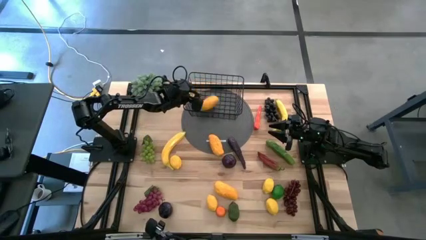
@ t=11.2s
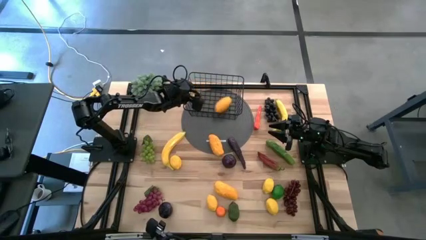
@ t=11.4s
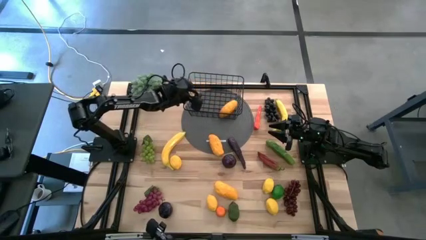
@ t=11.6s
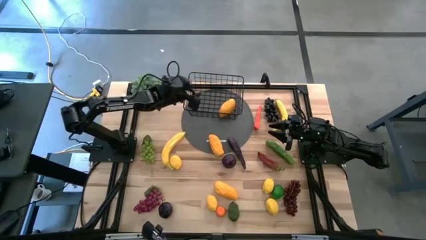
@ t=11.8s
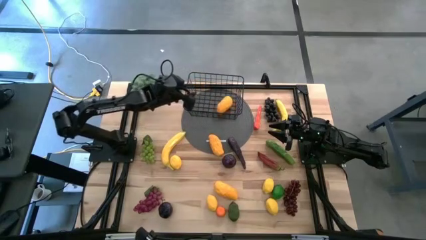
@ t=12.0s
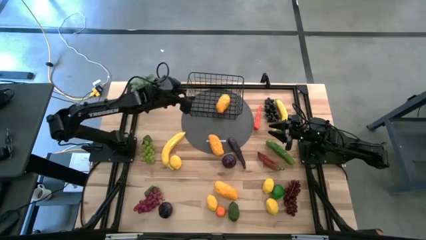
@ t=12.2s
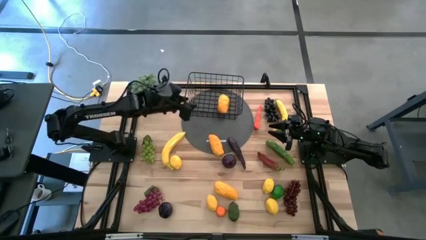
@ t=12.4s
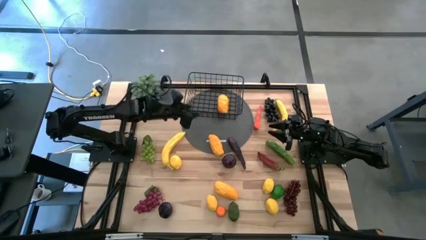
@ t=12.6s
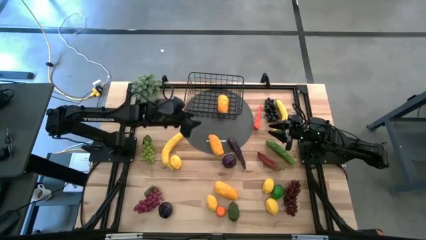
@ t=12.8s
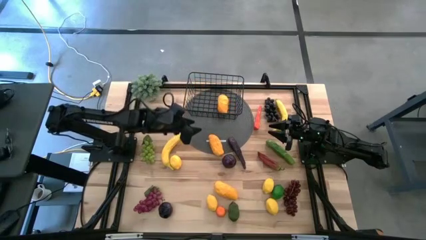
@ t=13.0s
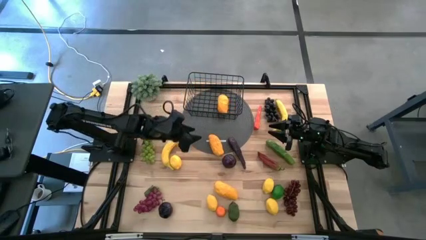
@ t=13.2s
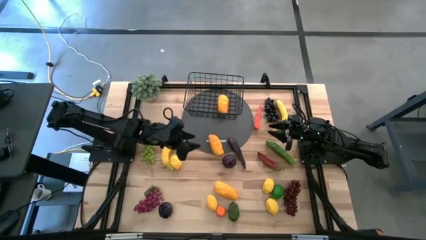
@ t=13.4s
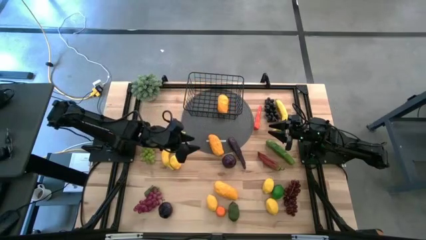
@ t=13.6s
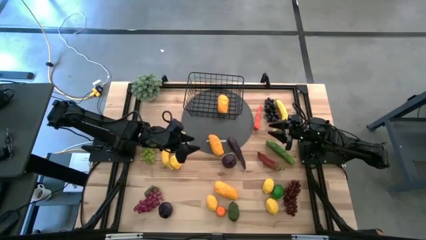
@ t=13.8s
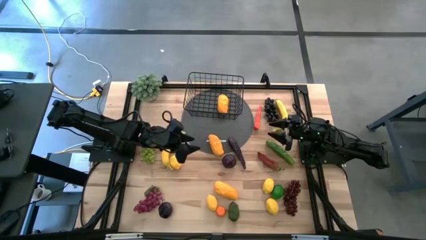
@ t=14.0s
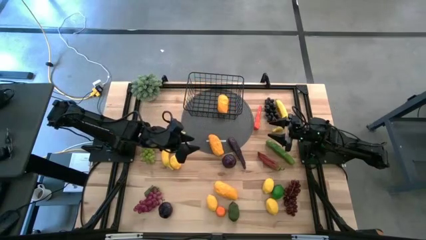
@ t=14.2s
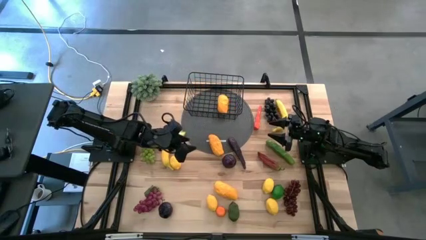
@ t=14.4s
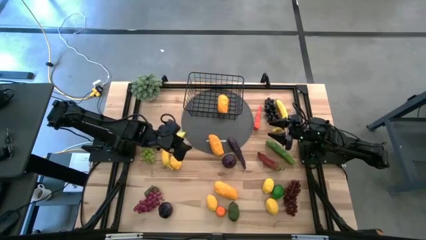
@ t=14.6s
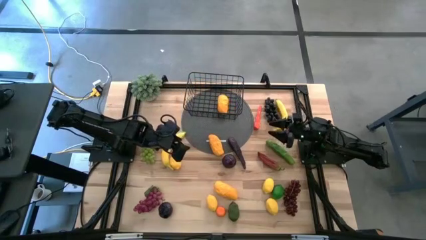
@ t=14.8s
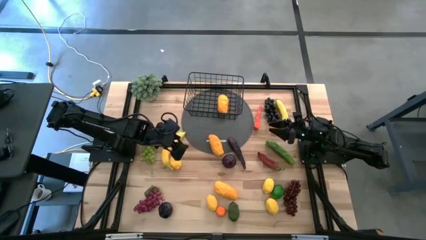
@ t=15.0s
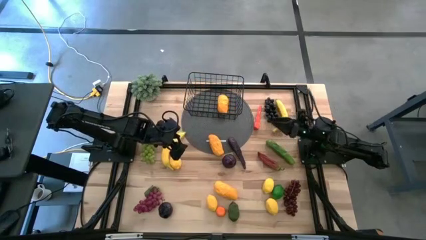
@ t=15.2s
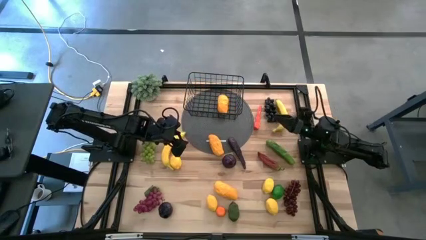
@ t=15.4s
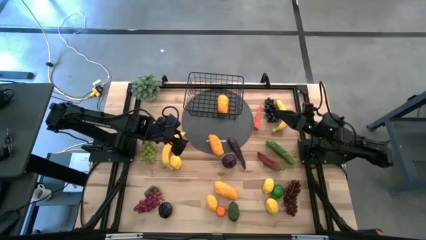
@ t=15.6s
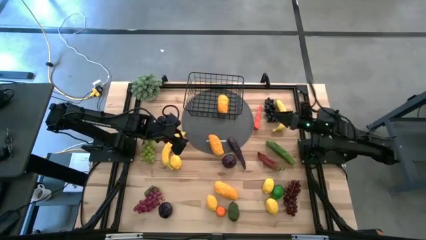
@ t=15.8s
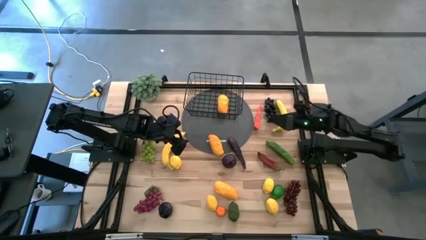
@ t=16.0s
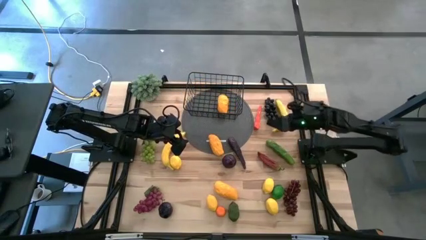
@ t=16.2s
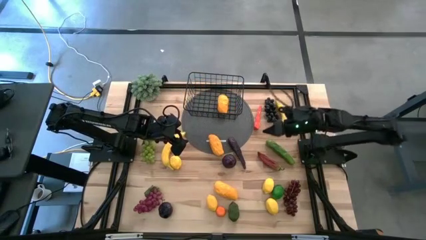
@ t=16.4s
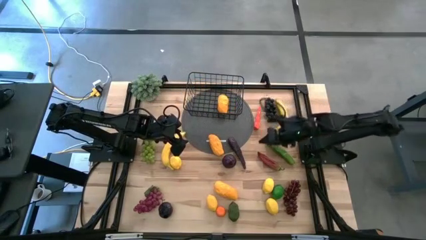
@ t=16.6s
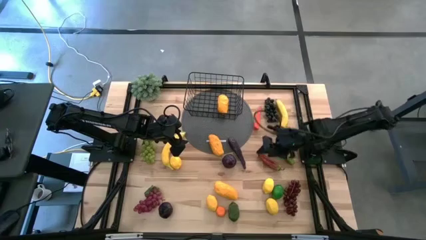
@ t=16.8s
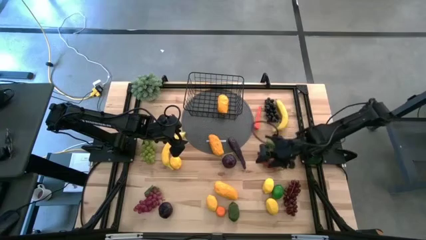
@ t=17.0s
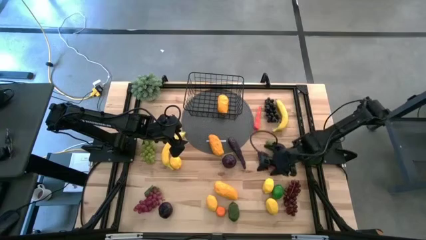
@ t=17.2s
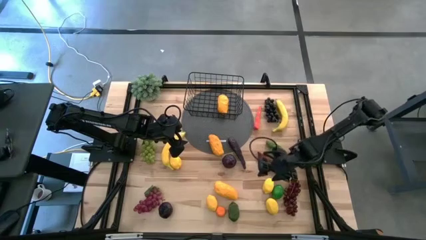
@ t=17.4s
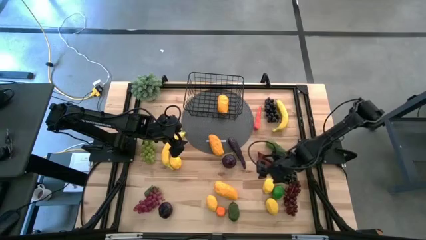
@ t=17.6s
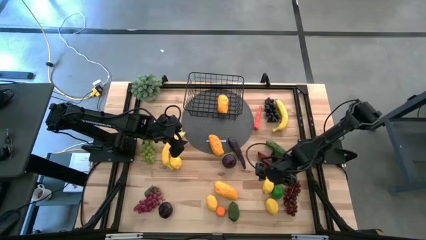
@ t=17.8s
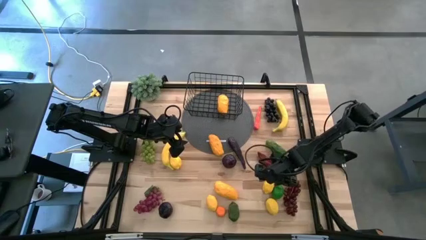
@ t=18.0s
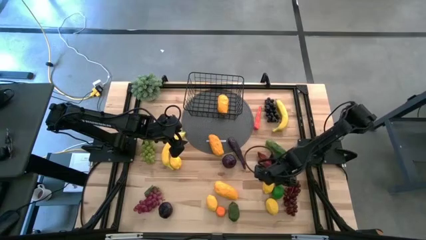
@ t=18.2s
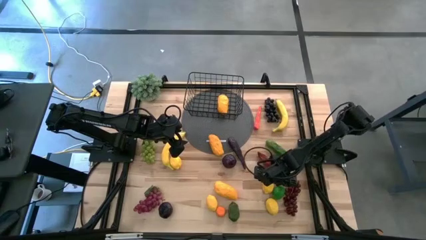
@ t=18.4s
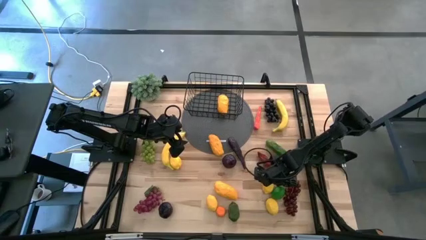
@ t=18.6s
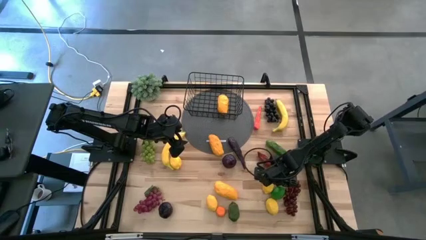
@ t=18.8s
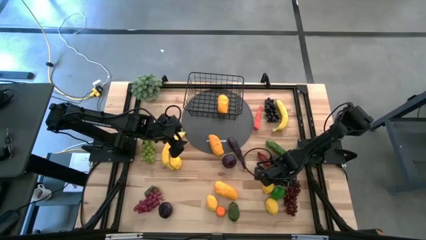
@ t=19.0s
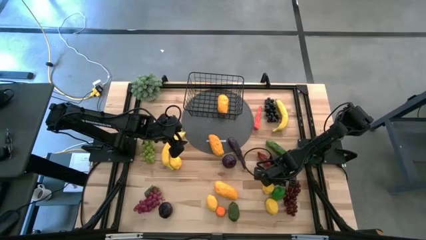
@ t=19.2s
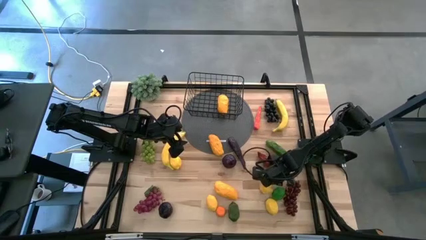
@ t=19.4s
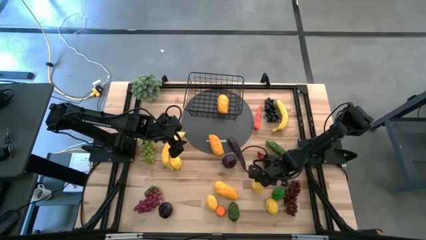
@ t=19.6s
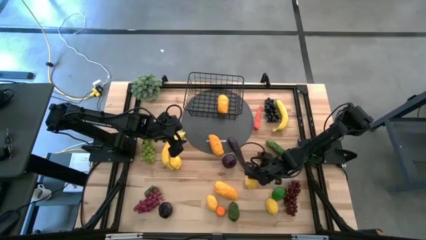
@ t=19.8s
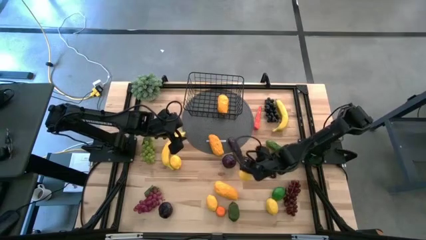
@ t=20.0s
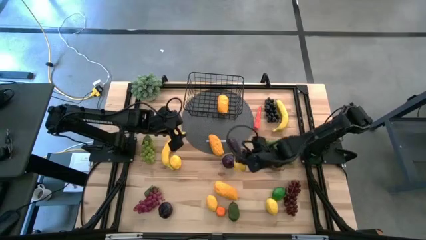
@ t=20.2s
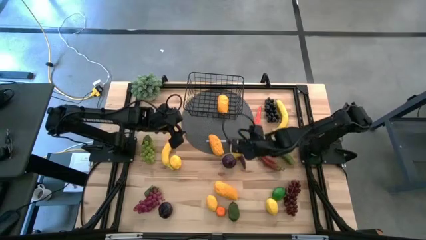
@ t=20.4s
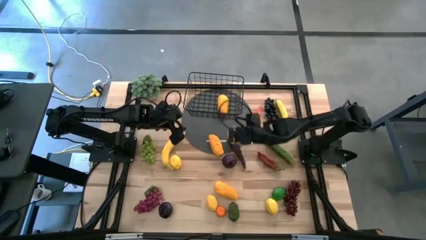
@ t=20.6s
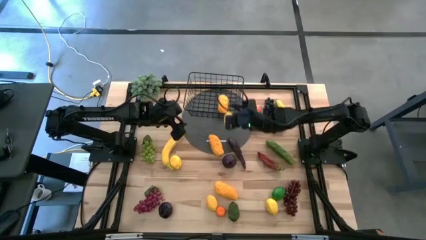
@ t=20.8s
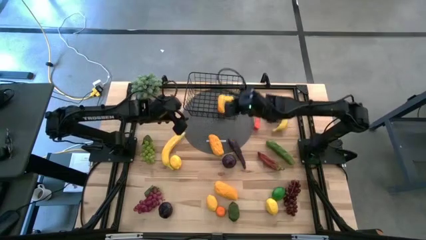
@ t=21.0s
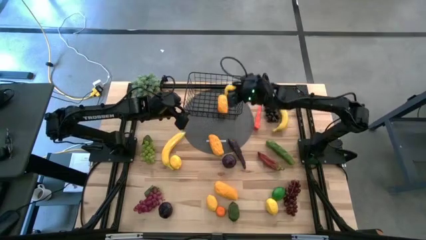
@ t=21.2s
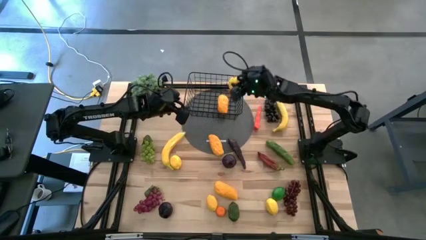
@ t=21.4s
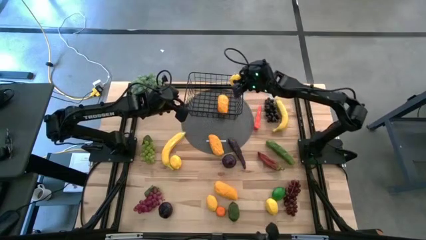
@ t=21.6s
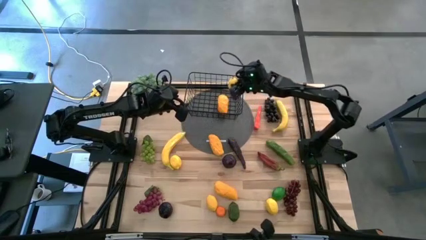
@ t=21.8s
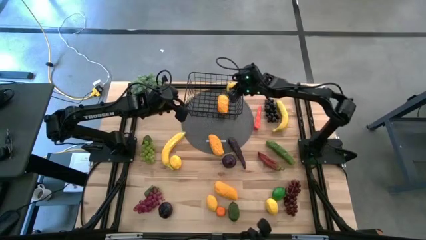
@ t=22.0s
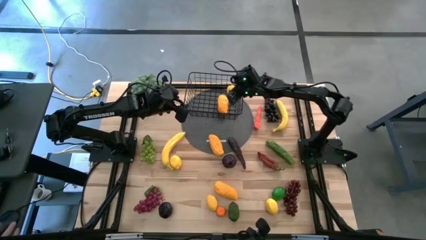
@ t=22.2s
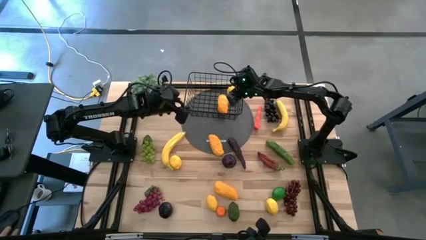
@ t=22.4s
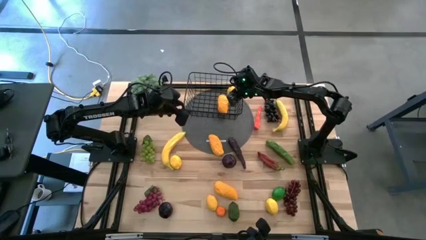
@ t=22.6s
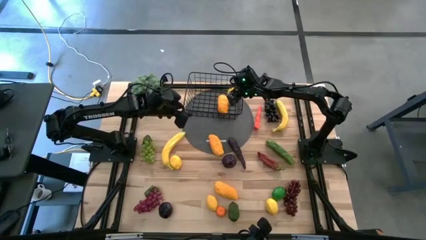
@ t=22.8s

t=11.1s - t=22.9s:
Task: Build produce basket
Put the lemon into the black wire basket

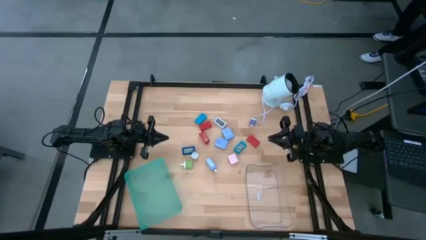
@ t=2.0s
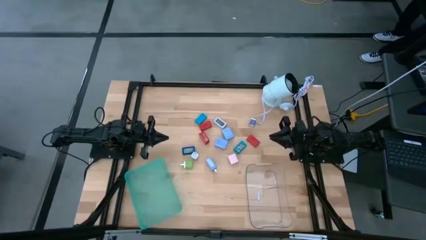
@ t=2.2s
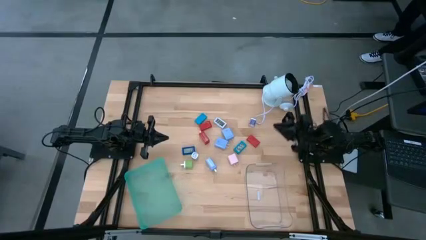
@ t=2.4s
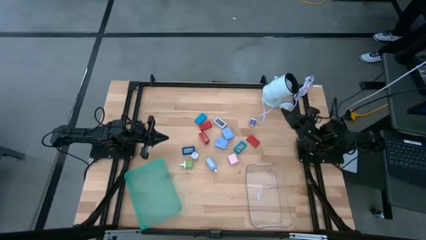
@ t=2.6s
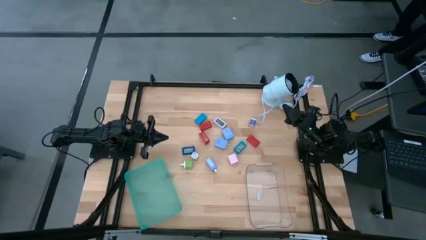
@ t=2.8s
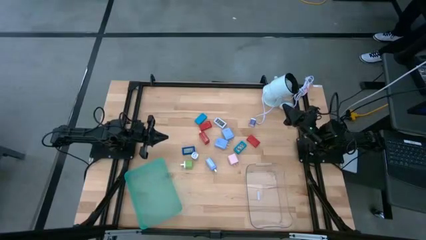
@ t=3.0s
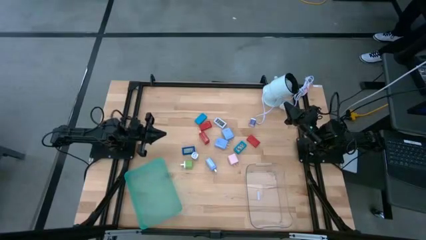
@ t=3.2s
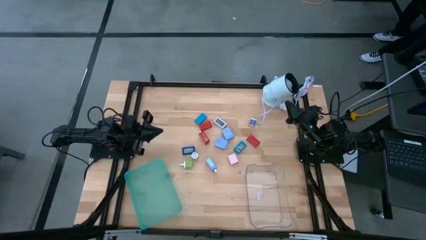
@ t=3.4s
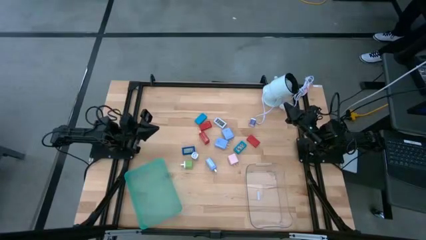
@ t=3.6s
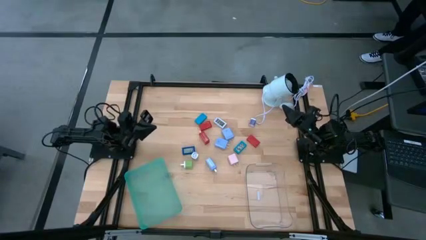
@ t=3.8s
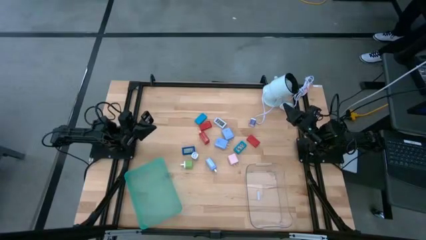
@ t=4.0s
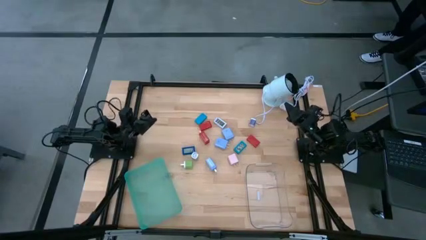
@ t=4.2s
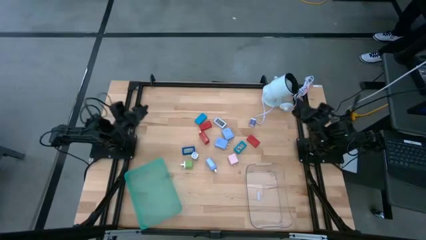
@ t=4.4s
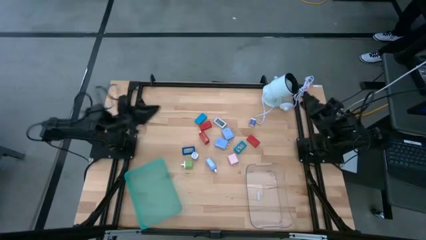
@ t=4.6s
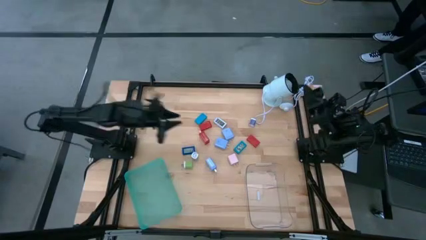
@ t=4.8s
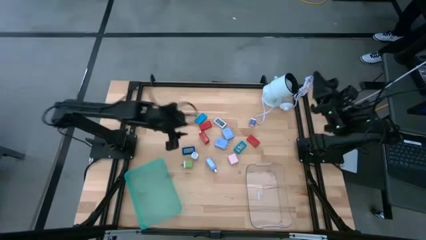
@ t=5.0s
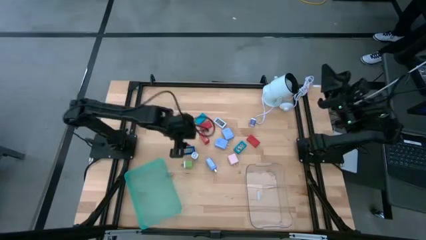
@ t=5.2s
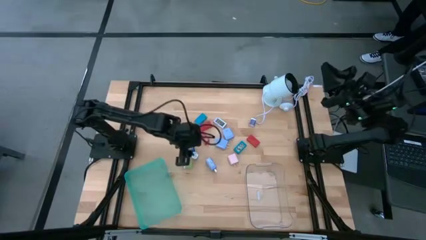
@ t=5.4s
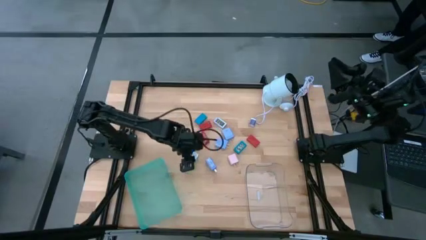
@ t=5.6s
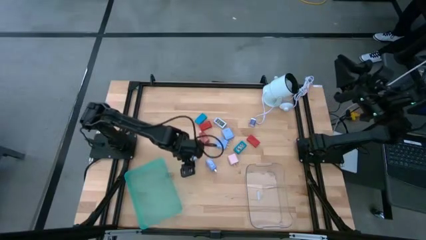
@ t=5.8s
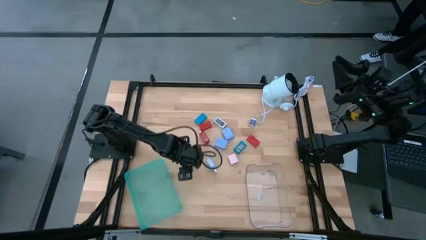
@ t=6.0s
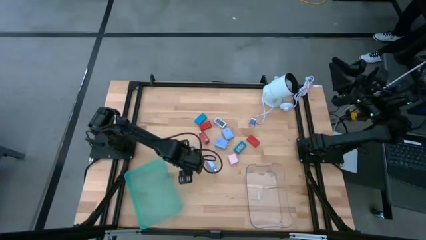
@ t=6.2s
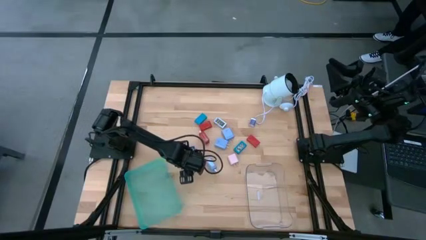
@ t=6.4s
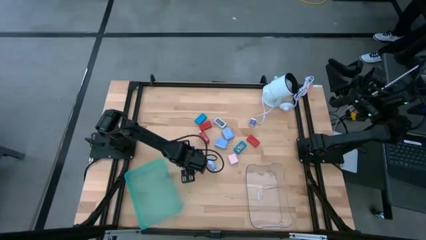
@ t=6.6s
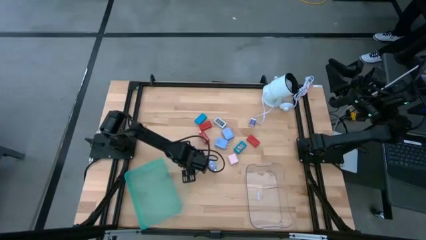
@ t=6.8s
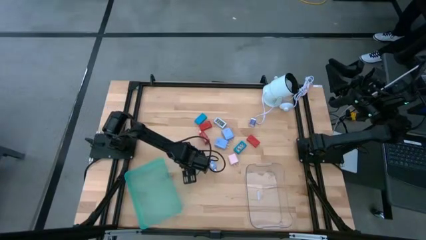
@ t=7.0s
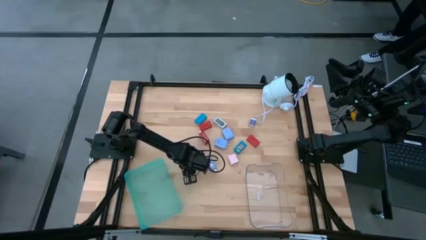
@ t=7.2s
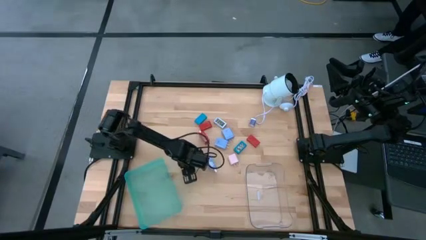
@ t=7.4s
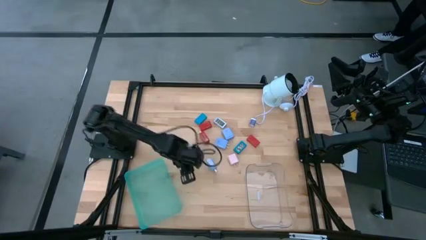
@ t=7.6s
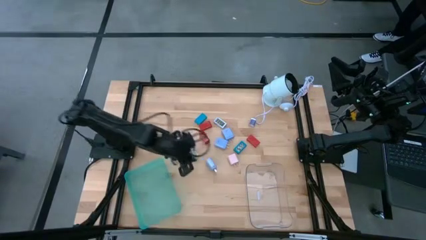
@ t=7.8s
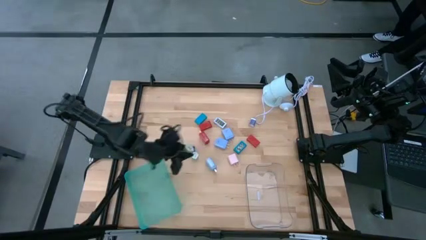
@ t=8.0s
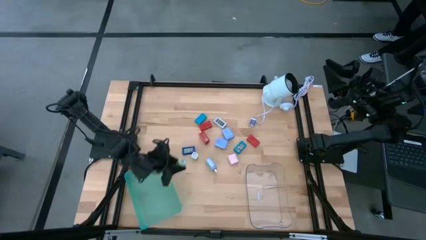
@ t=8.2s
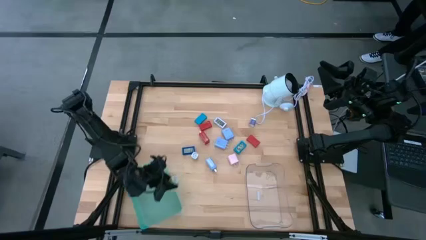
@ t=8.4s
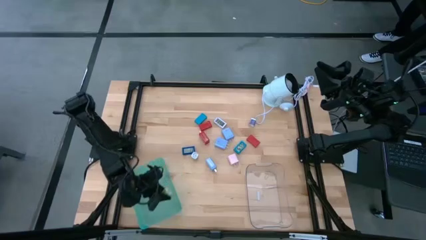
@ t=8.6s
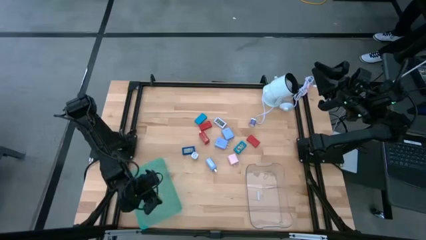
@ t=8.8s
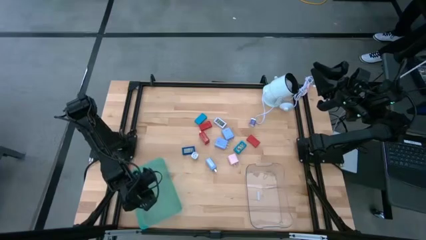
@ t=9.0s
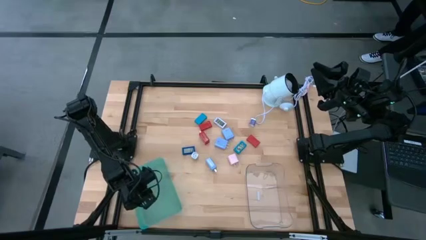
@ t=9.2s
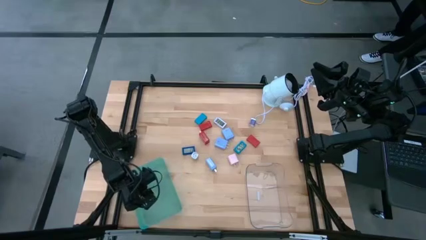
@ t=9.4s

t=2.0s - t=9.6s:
Task: Pick & Place Office items
Put the bottom green charger adapter into the blue bin
